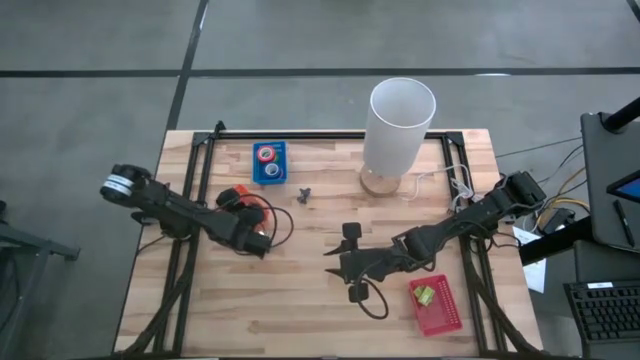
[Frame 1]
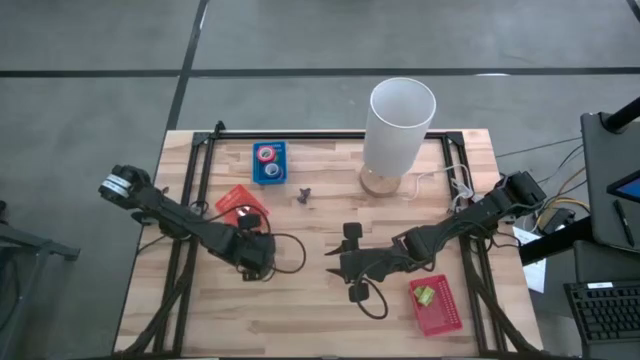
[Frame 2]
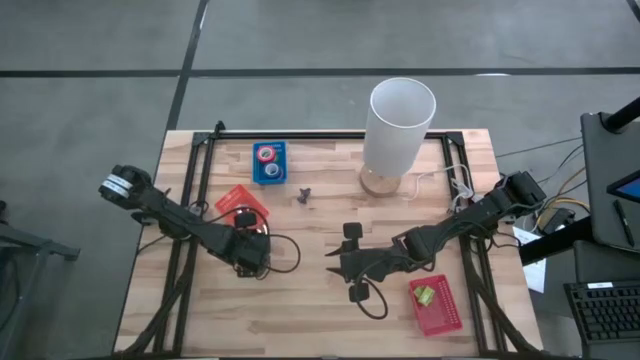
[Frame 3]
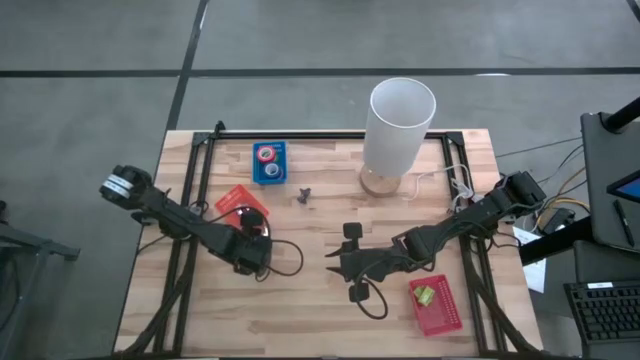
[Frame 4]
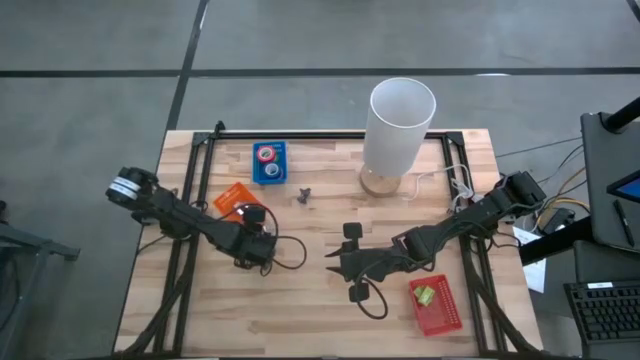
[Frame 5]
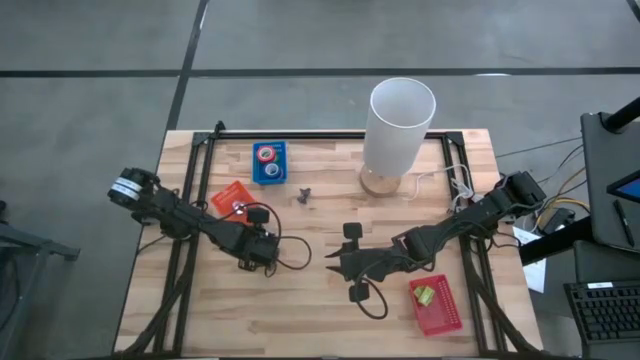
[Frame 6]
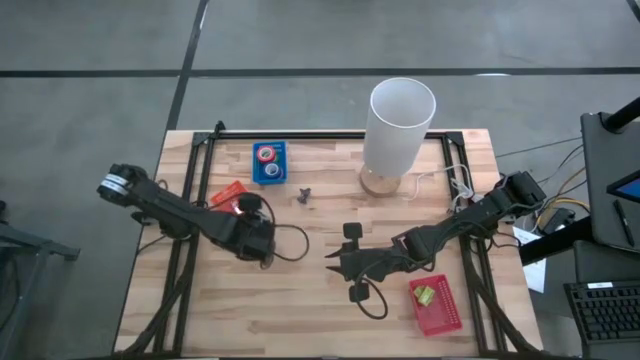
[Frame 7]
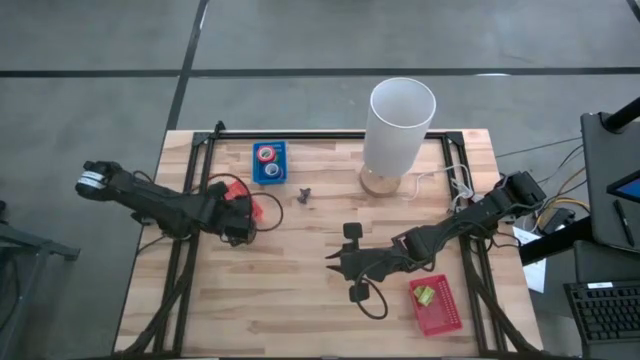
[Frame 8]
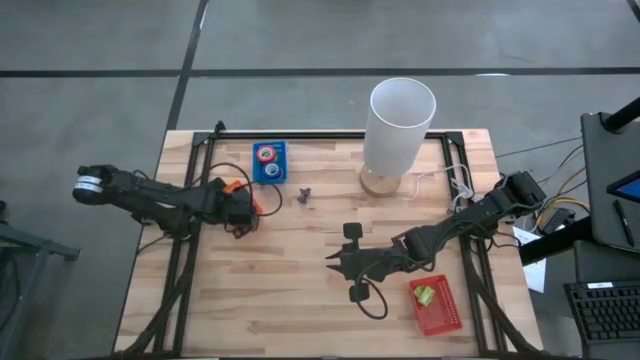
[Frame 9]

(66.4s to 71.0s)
Task: Pick and place Stapler, Stapler remover, tape
Put the light blue staple remover into the orange bin

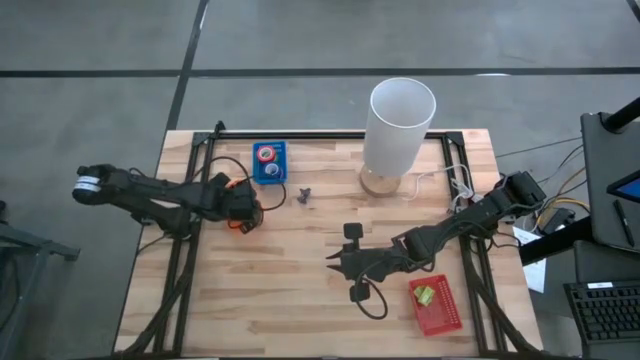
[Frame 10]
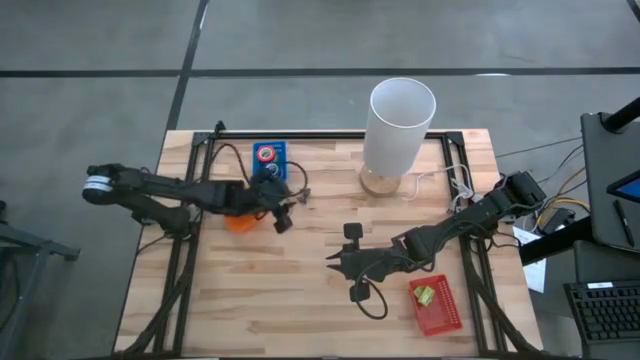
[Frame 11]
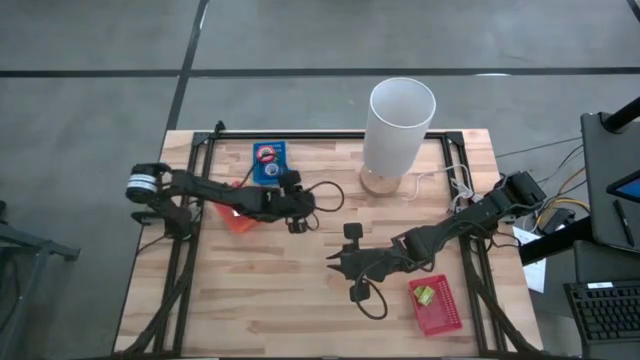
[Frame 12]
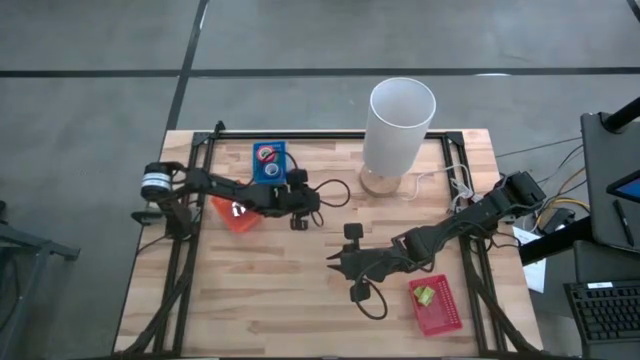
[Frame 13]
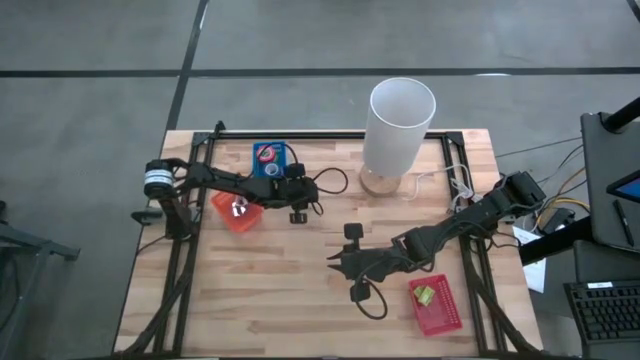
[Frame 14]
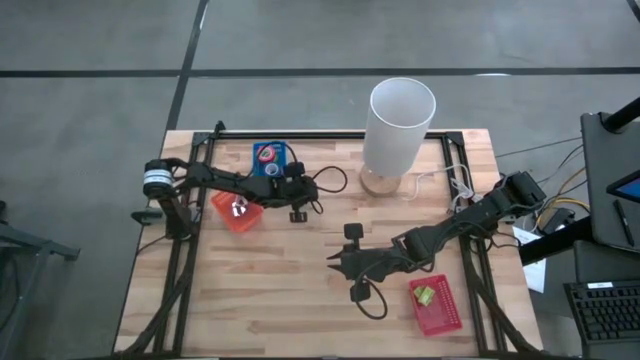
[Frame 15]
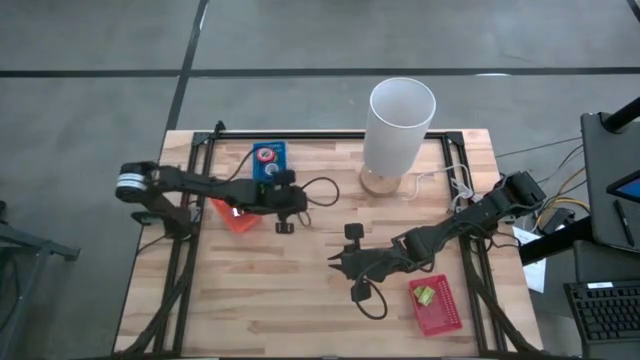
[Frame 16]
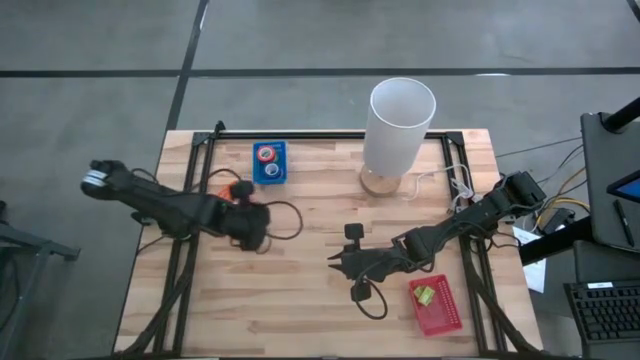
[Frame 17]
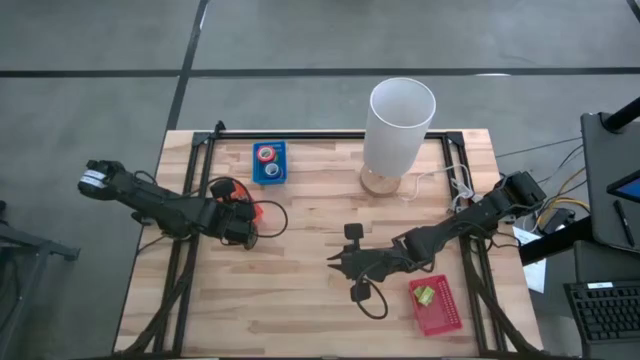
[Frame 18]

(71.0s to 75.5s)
Put the black staple remover into the orange bin

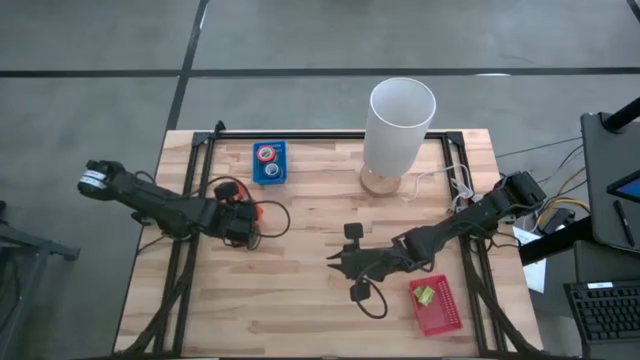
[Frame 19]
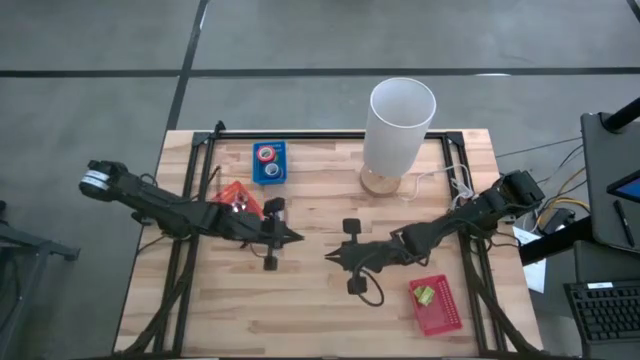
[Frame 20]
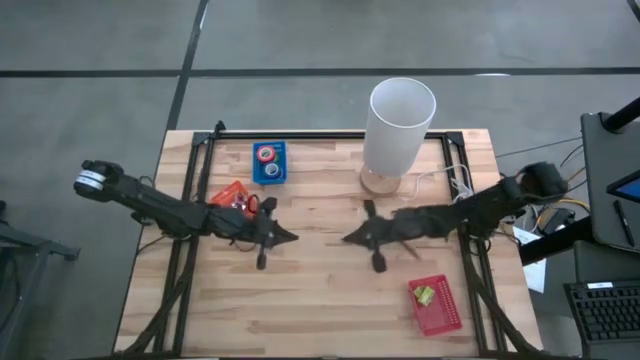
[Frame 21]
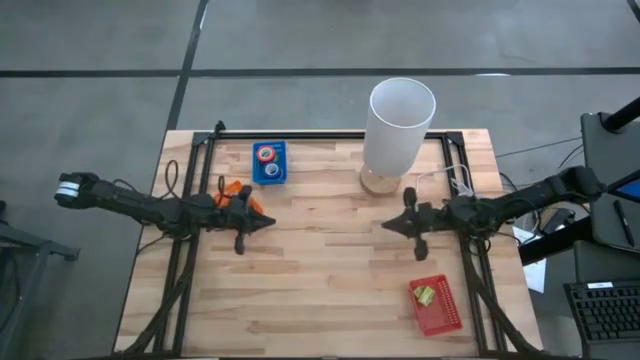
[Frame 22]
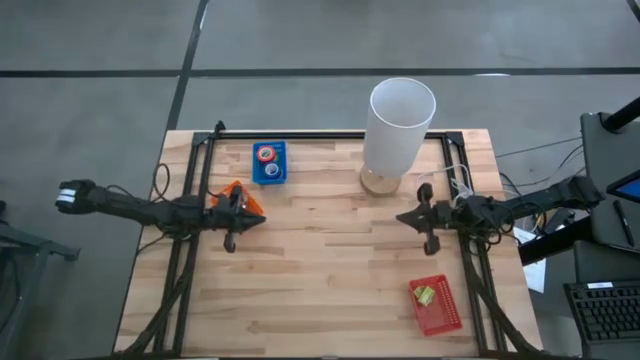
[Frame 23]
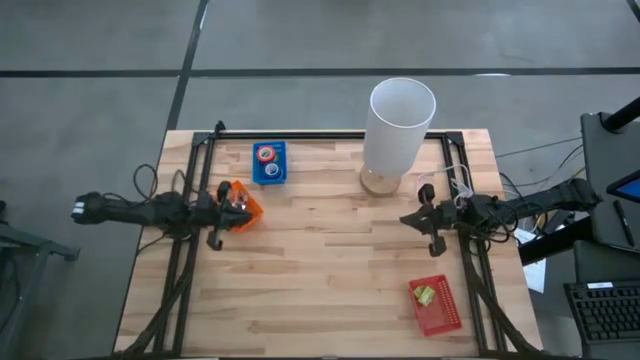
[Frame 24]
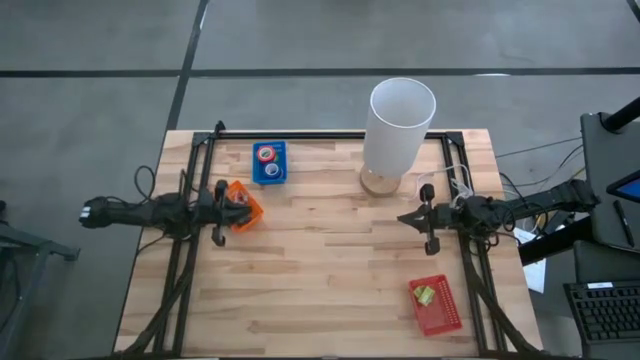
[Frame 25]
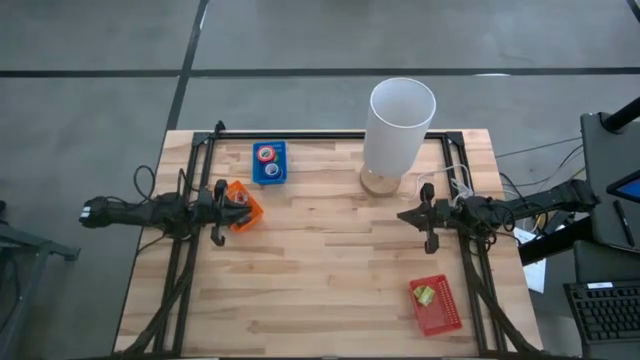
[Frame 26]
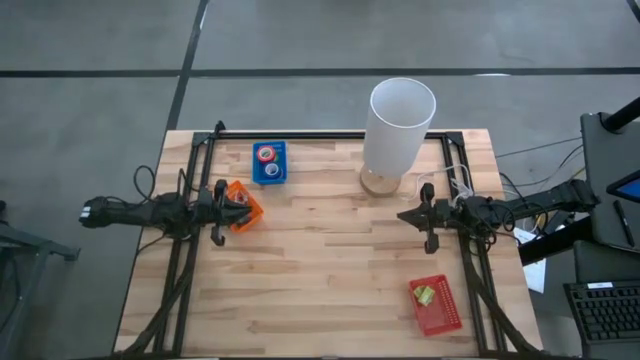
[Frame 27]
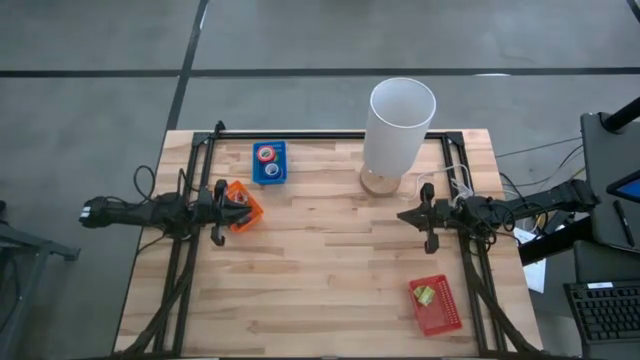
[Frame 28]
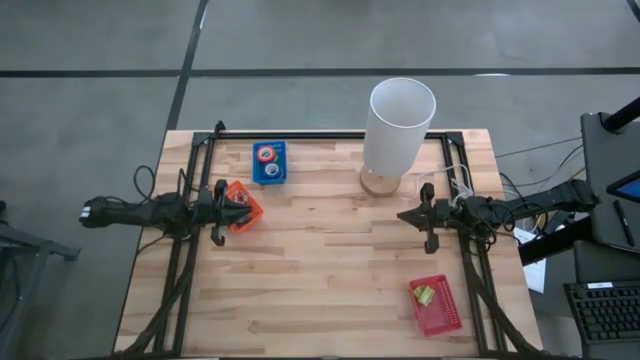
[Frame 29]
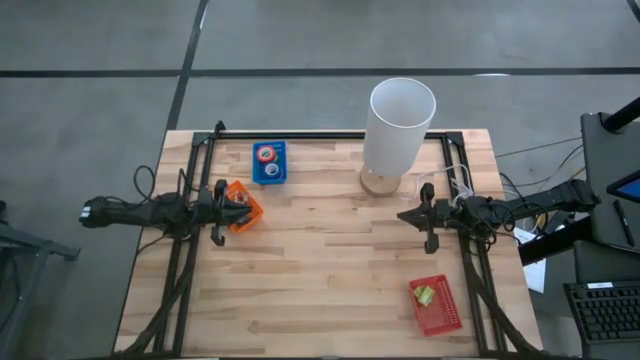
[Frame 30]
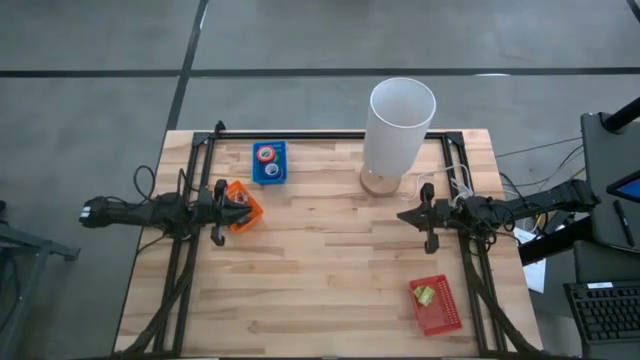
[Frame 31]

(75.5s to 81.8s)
Return to Home Position

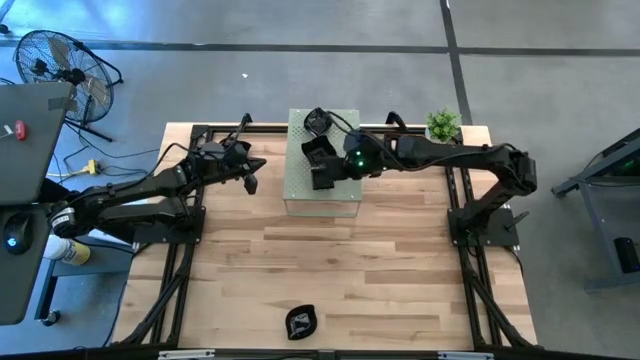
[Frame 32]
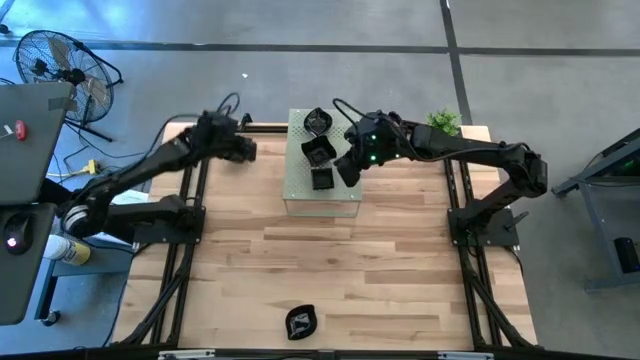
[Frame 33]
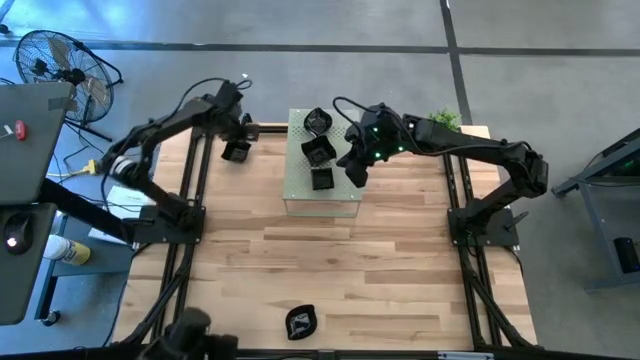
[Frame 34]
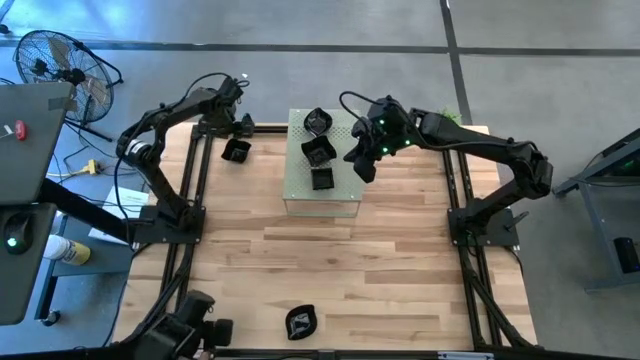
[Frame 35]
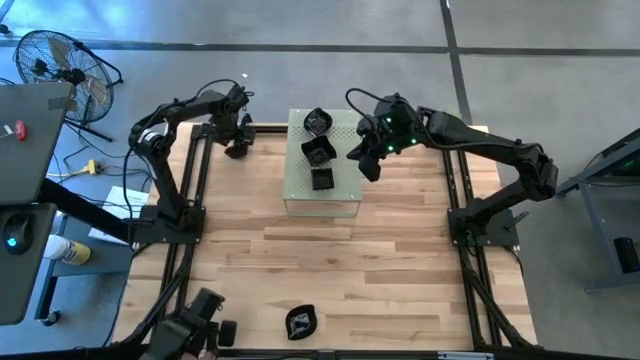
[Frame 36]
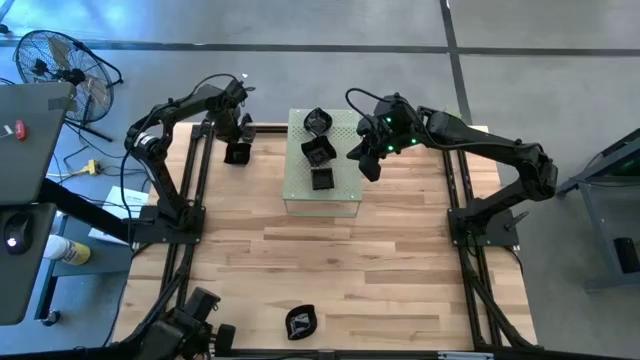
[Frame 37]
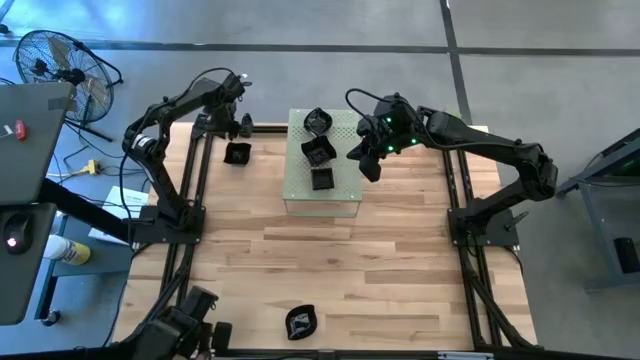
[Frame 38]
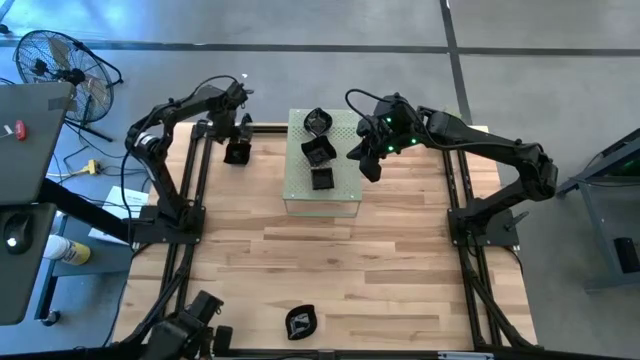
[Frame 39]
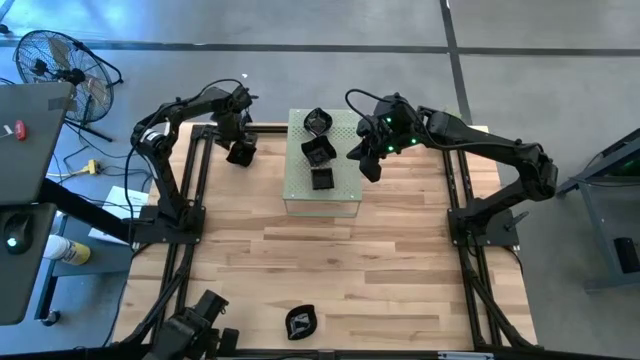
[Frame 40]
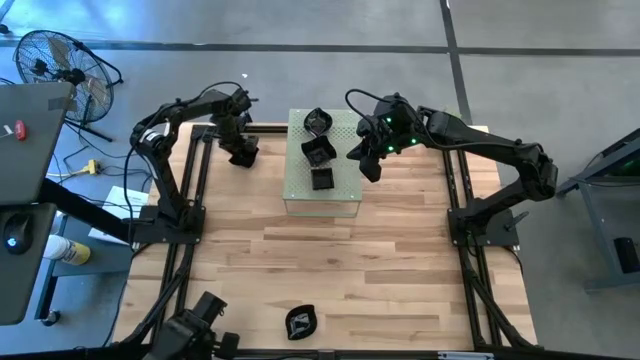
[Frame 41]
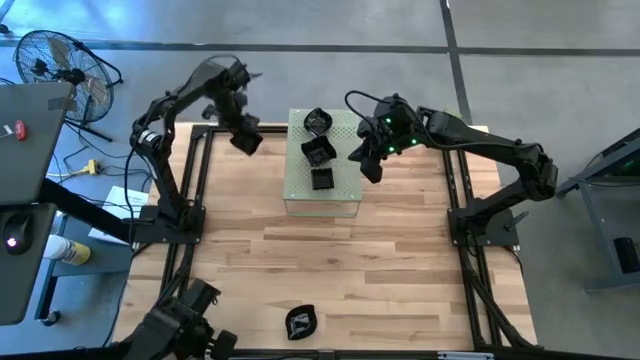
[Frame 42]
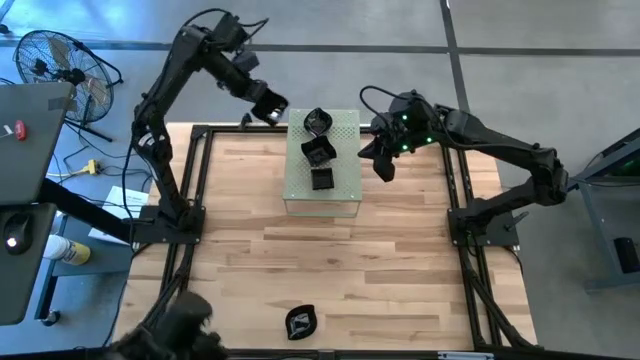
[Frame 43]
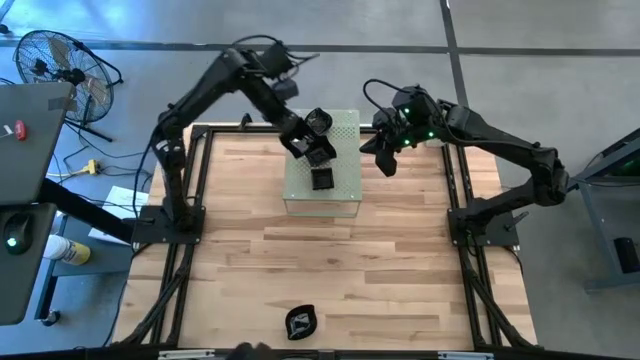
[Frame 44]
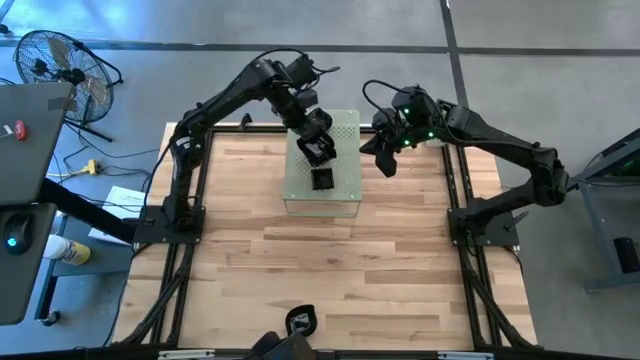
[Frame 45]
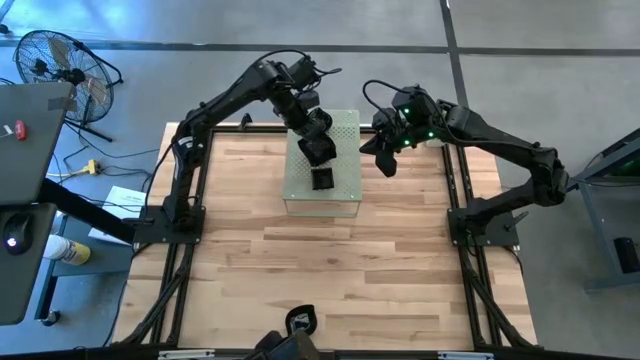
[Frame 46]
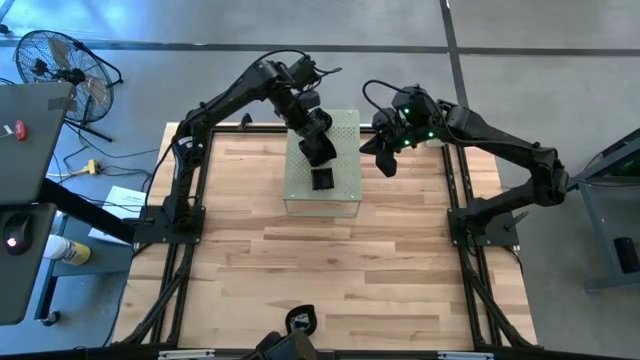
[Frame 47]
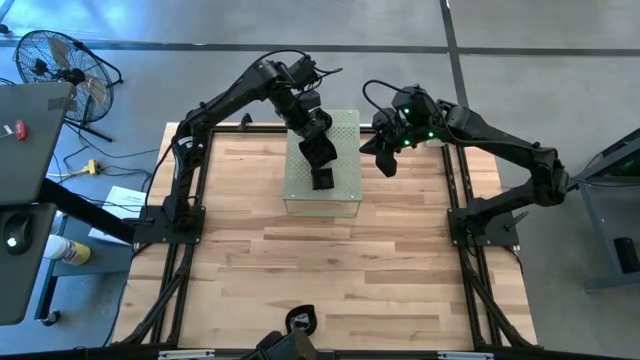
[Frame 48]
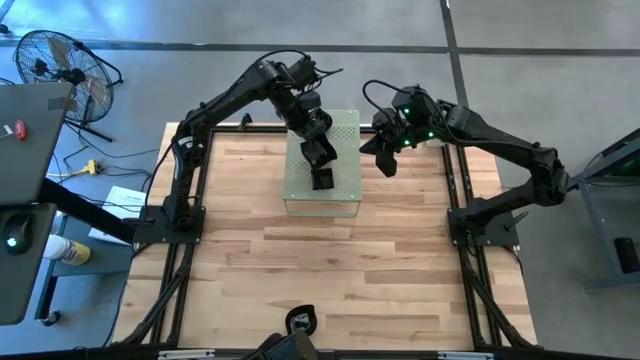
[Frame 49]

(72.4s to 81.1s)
Task: Pick & Place Mini shaped plates
Stack the black distorted square plate on top of the black distorted square plate on the shelf
